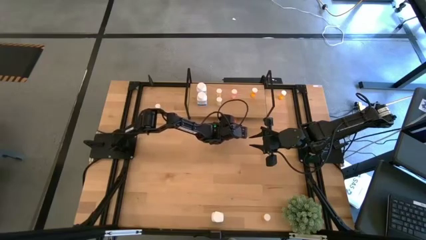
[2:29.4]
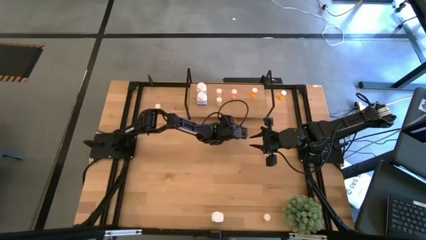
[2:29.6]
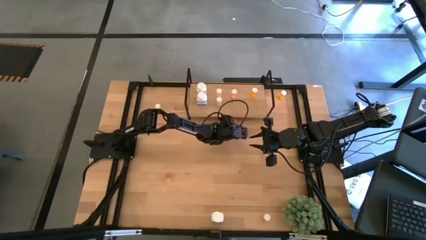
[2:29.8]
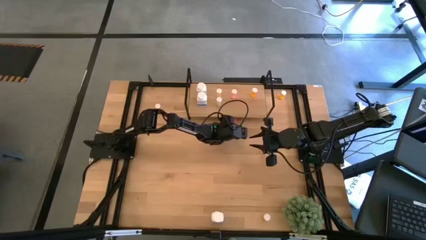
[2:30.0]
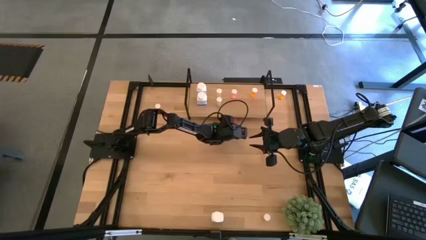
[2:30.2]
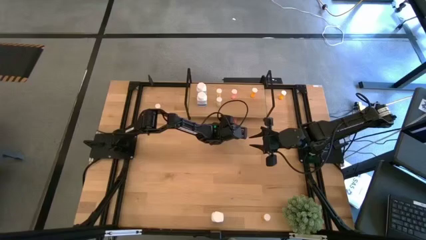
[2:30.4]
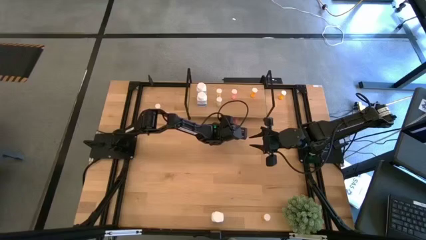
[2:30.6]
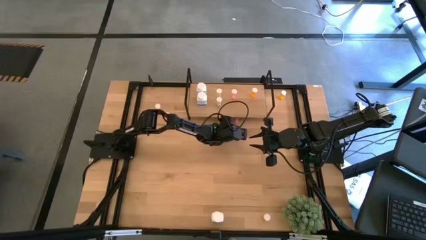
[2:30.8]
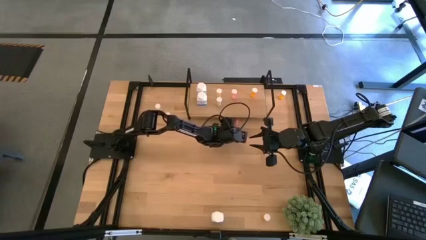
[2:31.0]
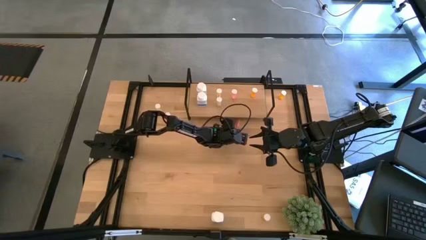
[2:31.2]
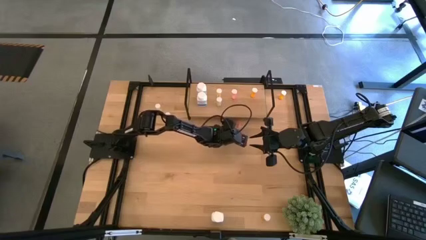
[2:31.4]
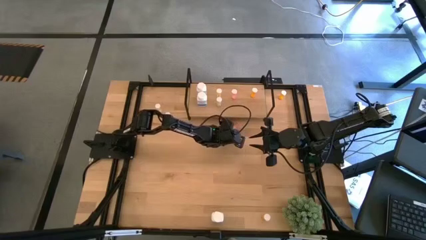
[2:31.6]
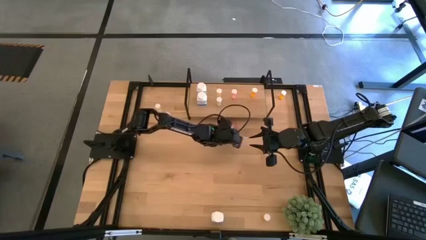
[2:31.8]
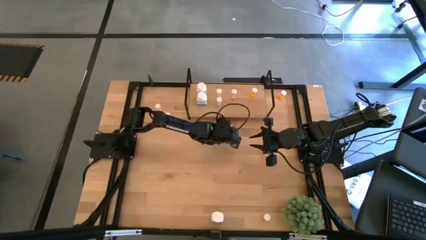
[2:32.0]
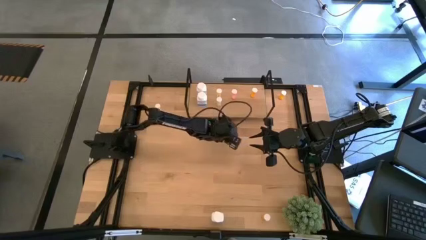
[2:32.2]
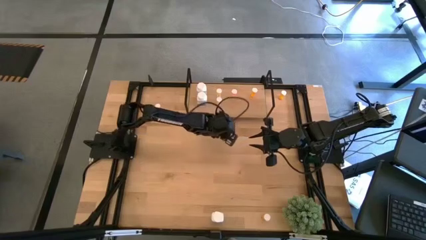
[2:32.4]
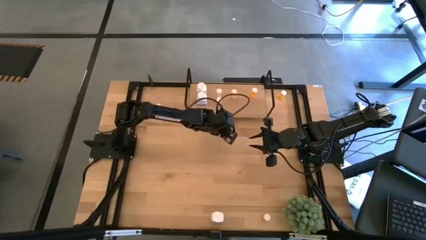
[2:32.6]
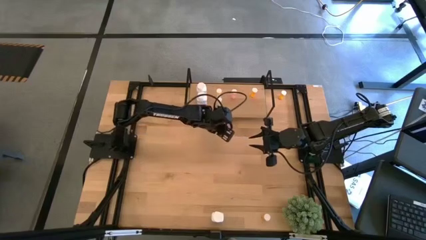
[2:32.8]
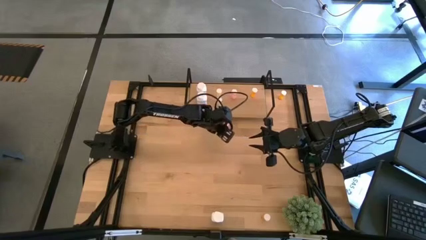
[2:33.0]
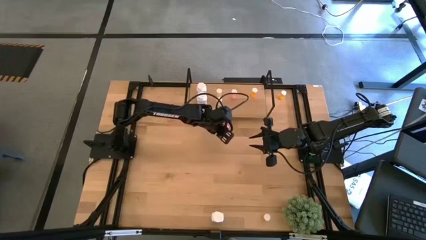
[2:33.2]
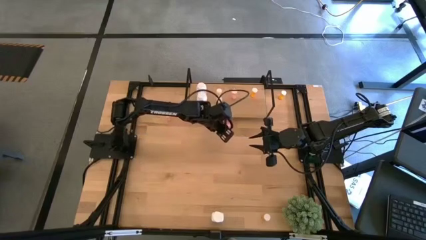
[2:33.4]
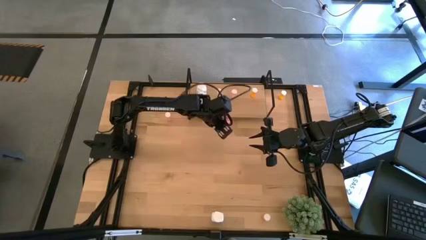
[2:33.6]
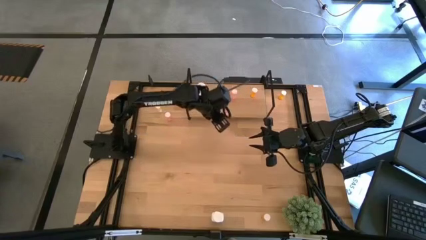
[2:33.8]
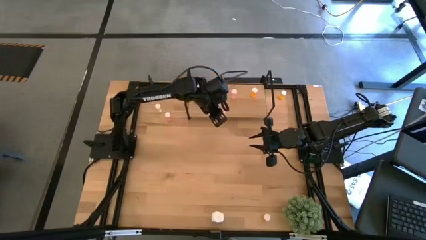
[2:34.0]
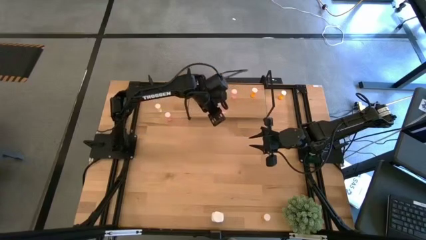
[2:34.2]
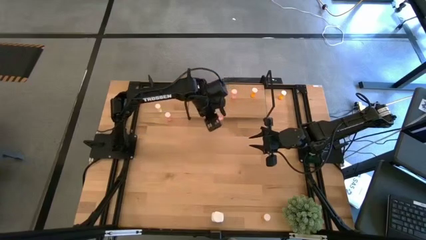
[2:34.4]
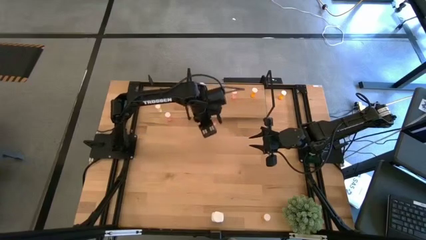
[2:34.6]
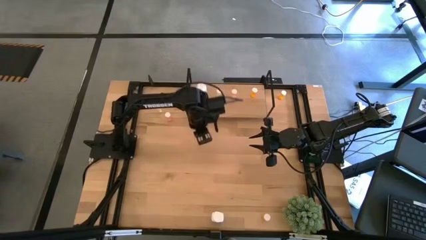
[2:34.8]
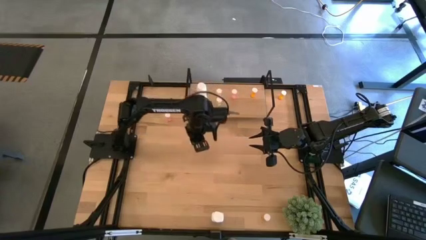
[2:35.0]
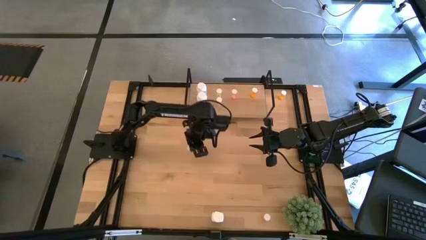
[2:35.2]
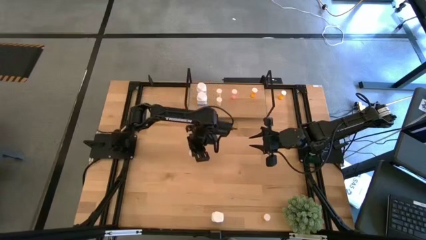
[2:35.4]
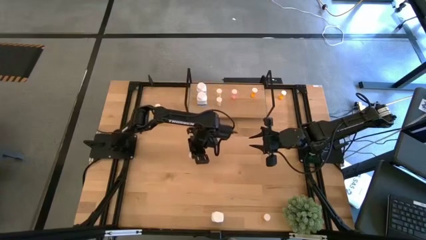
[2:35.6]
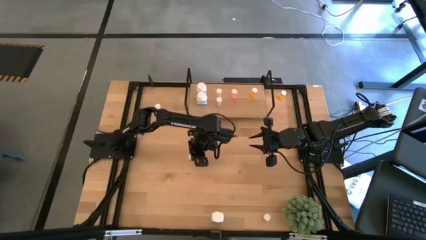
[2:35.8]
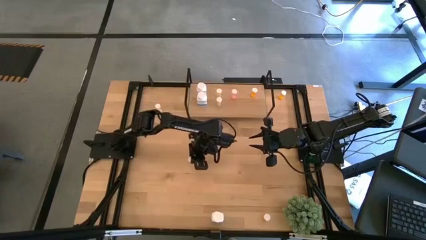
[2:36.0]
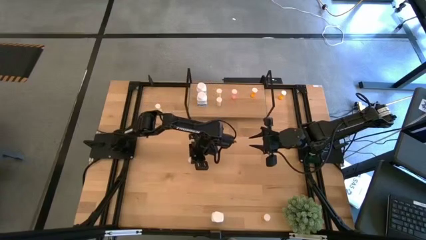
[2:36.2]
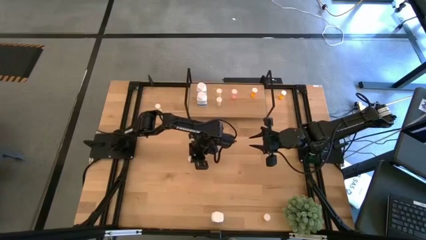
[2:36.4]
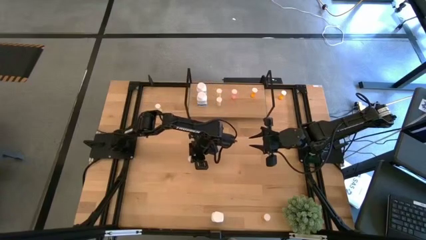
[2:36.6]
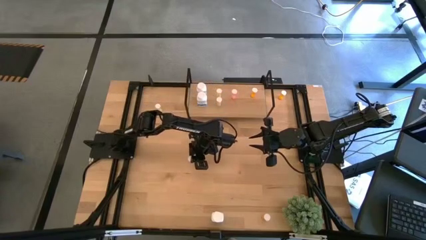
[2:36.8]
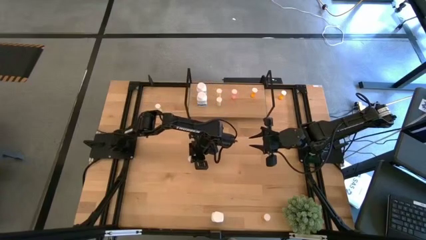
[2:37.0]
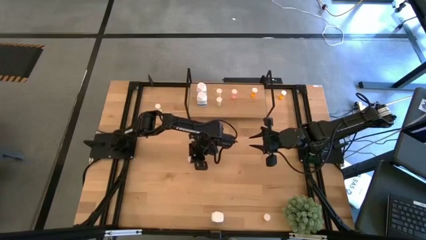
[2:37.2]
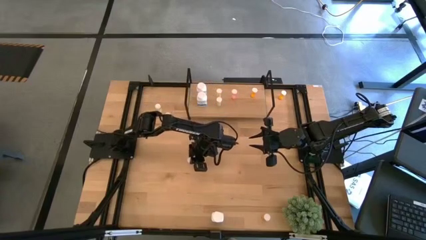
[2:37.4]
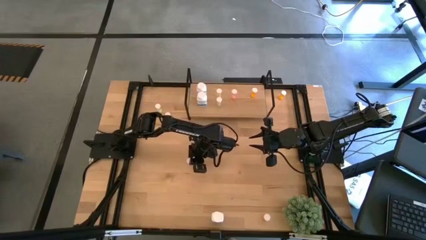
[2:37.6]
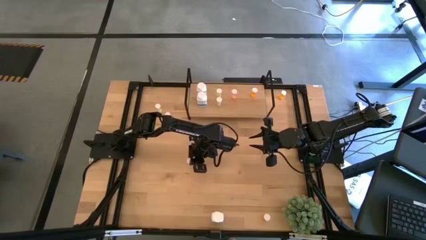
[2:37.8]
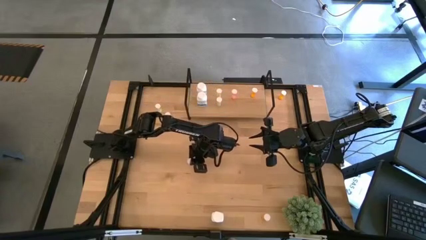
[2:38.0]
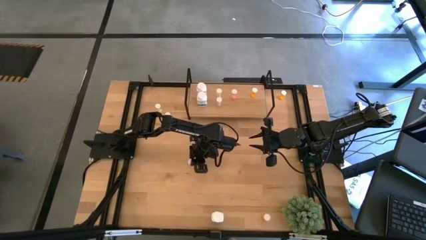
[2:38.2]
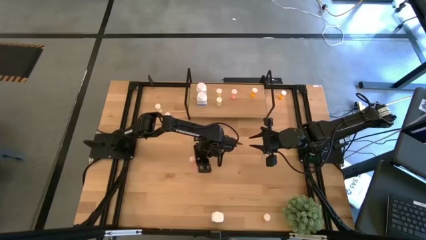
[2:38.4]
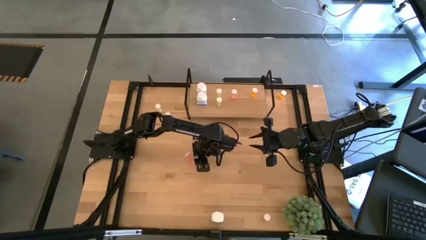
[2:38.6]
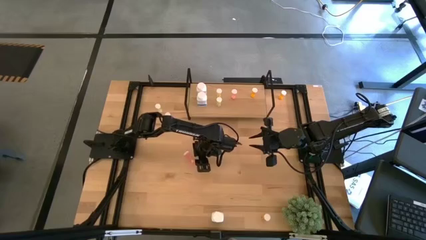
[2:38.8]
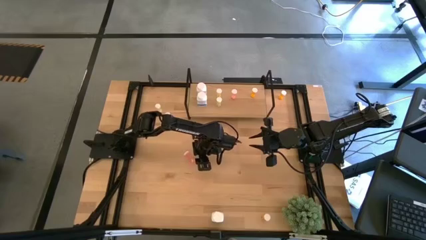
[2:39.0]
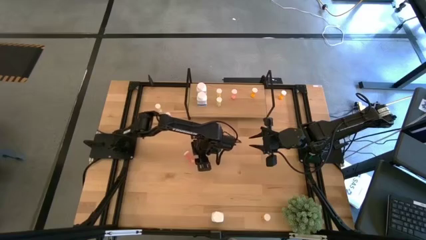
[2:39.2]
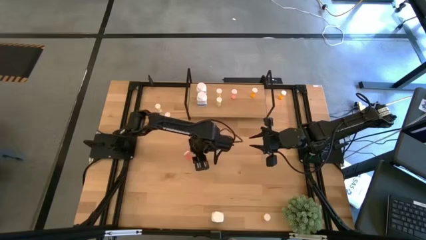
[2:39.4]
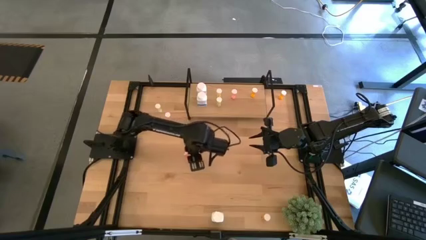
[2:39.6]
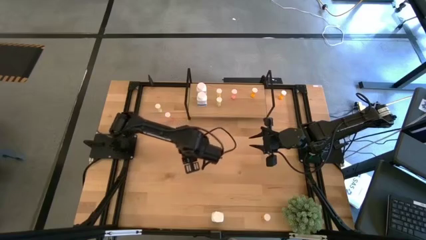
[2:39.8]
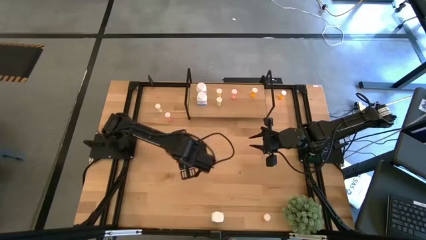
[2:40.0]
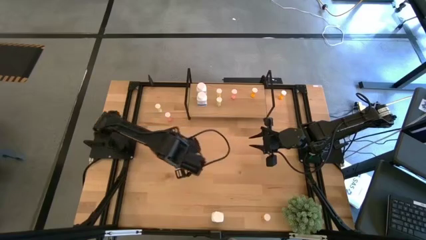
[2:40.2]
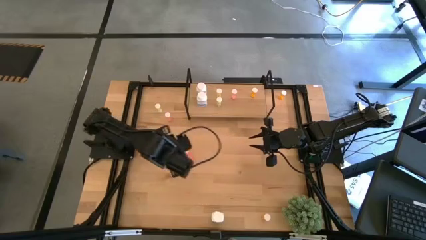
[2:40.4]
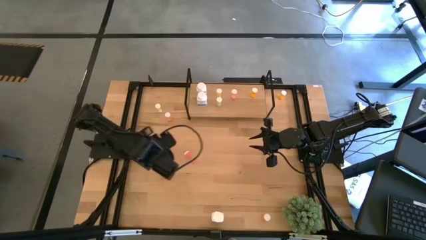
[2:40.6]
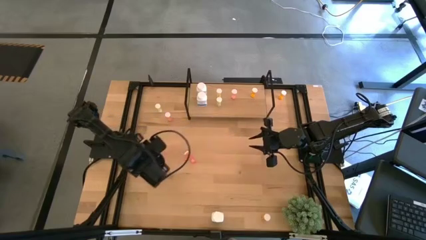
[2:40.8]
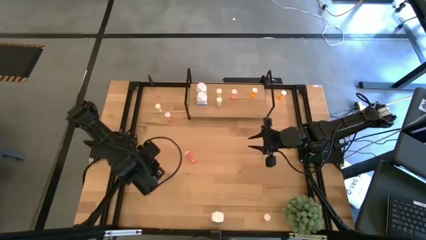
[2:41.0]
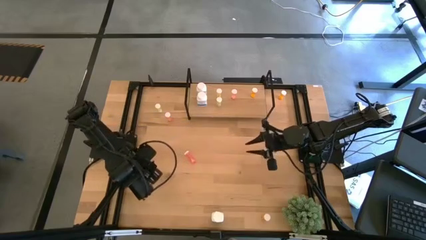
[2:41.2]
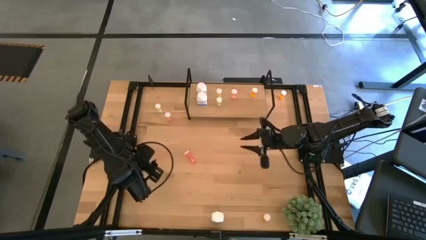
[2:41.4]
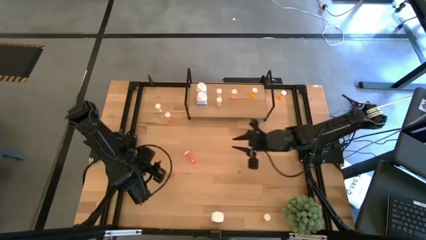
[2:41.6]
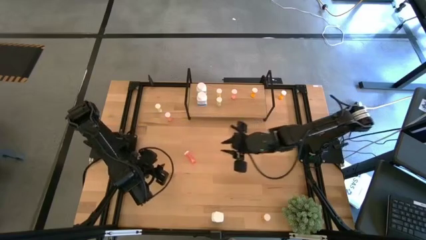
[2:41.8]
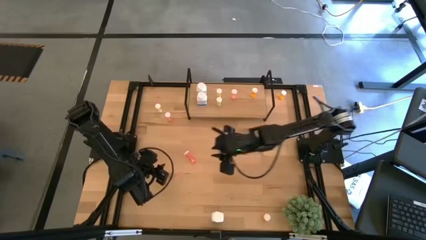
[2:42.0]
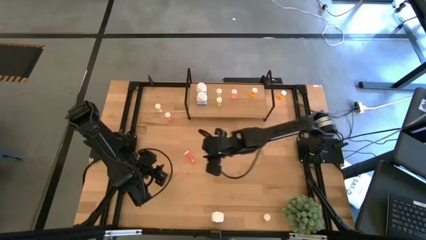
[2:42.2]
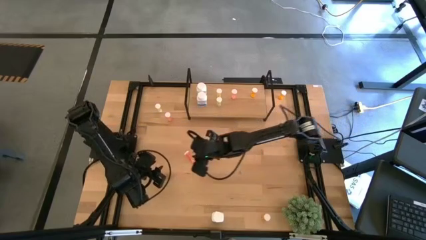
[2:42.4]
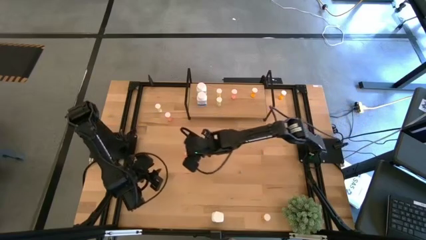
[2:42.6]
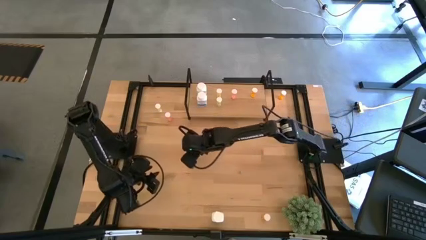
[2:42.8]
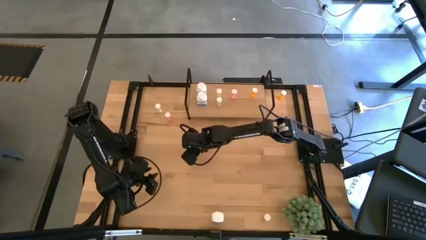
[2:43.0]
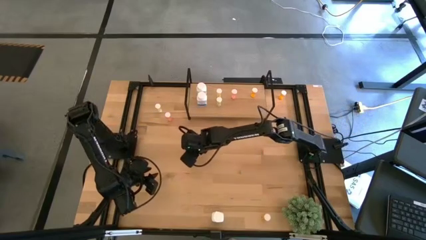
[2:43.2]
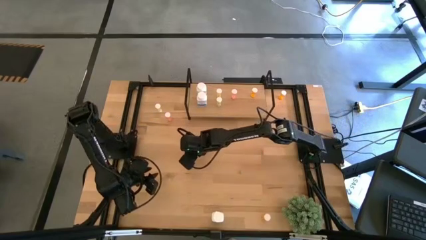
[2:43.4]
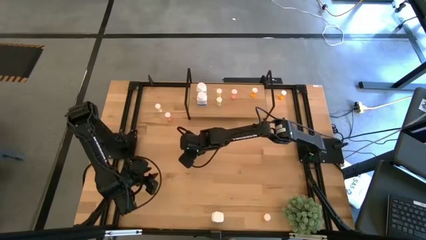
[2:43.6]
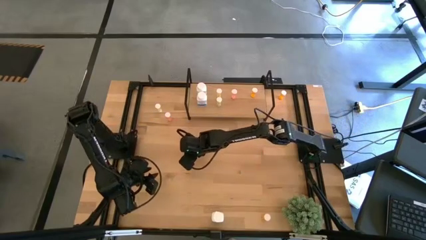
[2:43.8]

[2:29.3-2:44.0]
Task: Pick and place medicine bottles onto shelf by color
Put the bottom red pill bottle on the shelf aligned with the other red pill bottle
